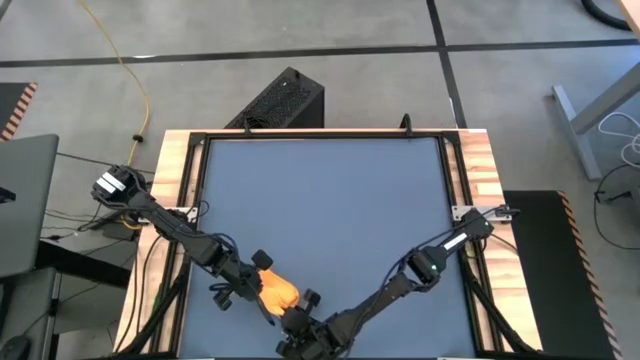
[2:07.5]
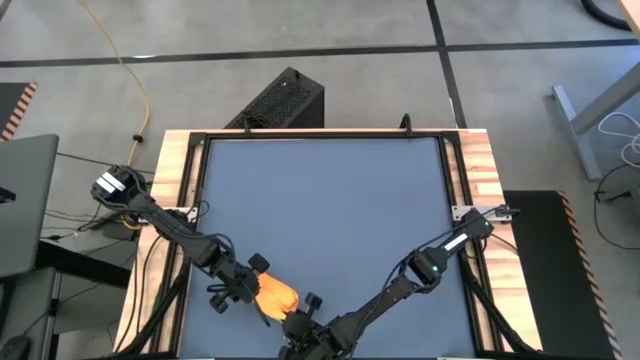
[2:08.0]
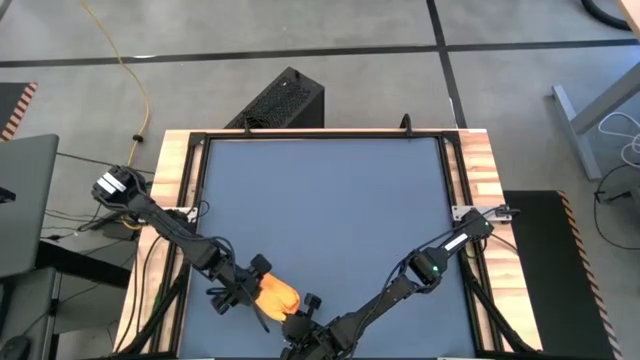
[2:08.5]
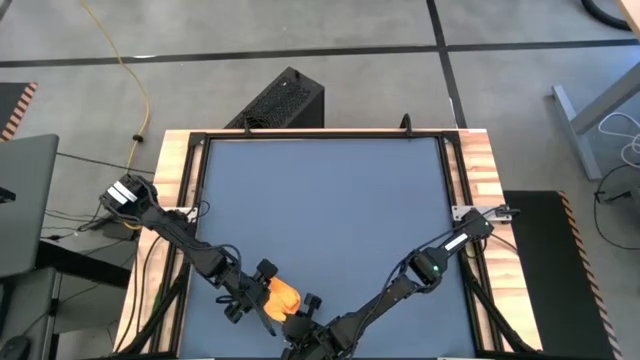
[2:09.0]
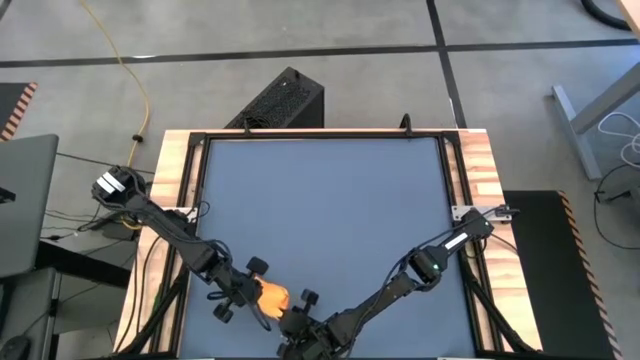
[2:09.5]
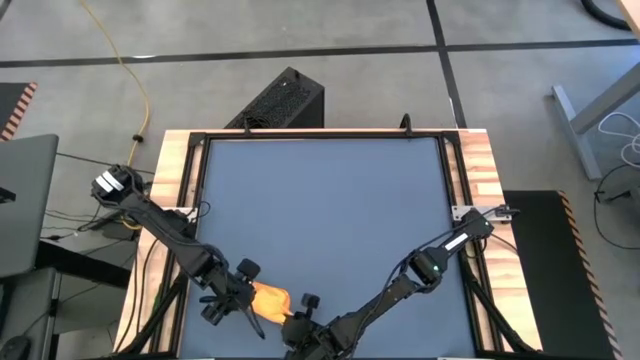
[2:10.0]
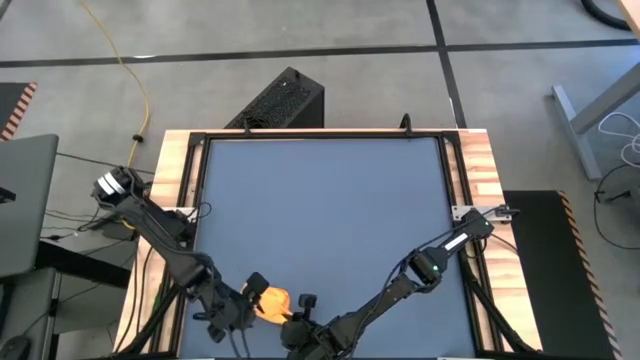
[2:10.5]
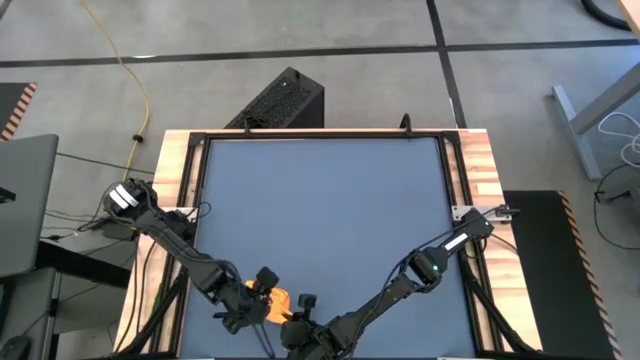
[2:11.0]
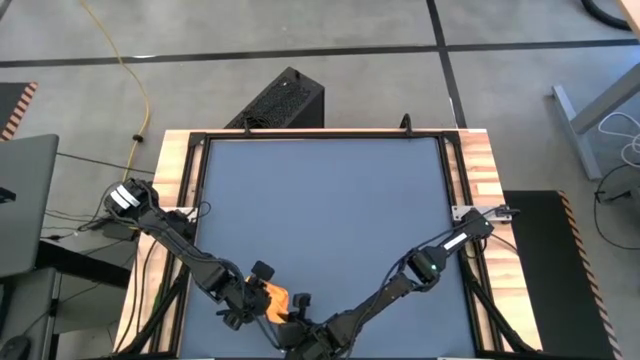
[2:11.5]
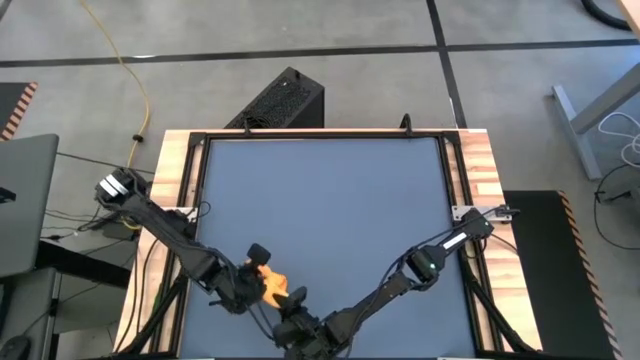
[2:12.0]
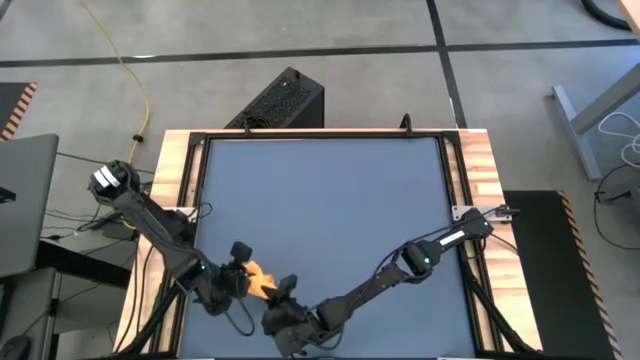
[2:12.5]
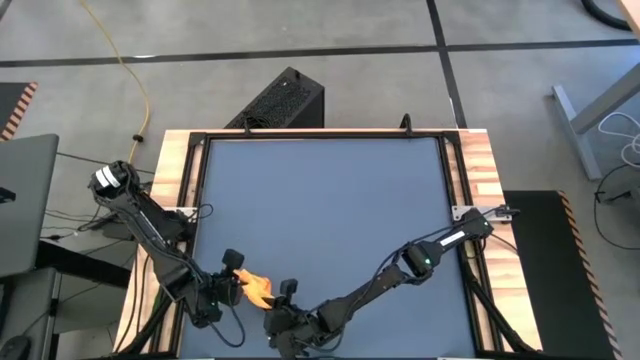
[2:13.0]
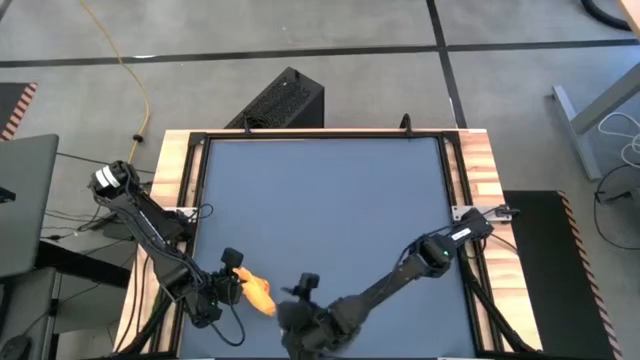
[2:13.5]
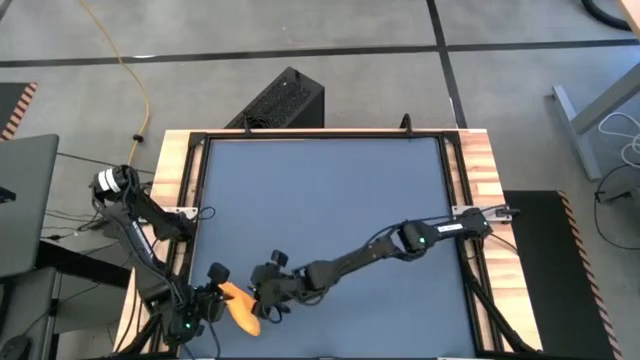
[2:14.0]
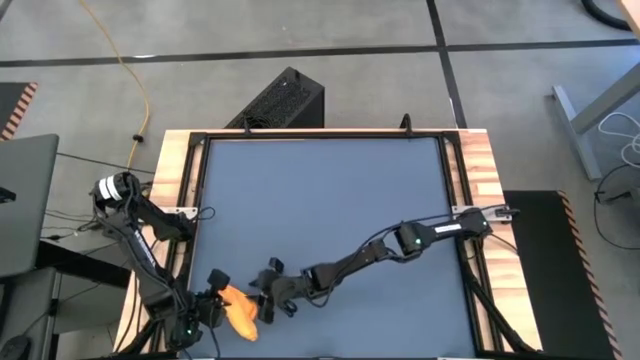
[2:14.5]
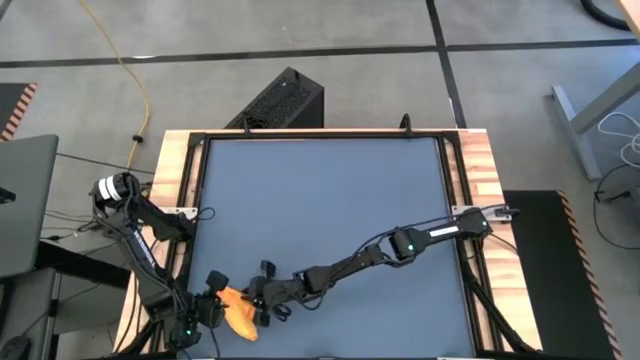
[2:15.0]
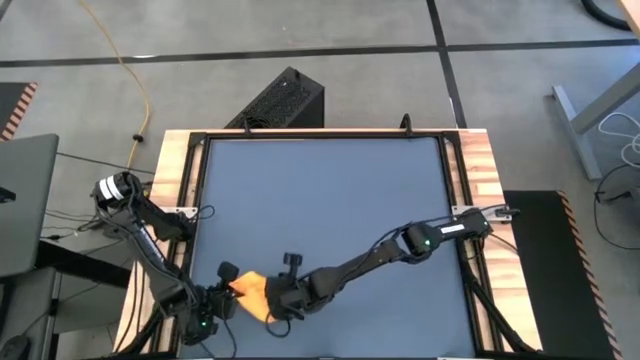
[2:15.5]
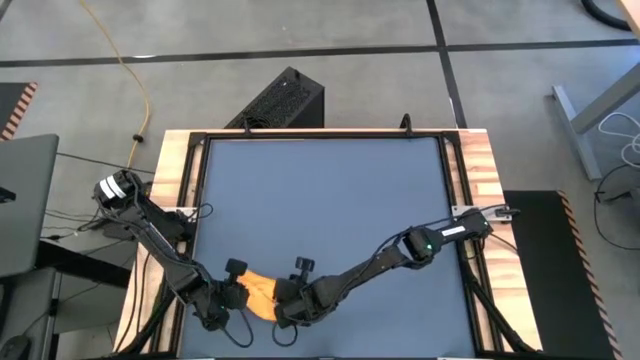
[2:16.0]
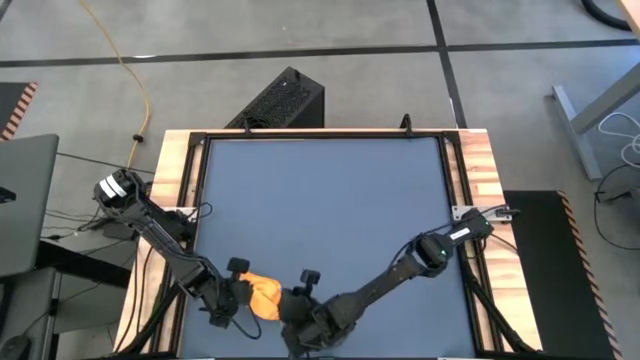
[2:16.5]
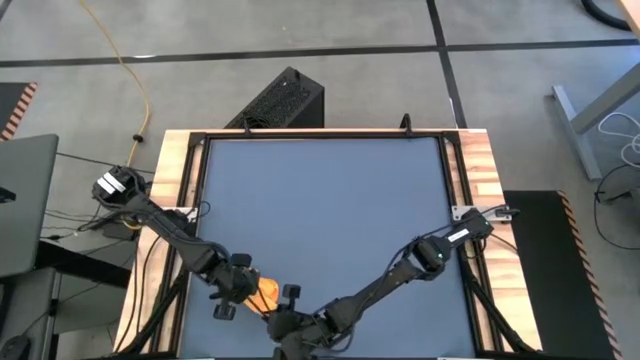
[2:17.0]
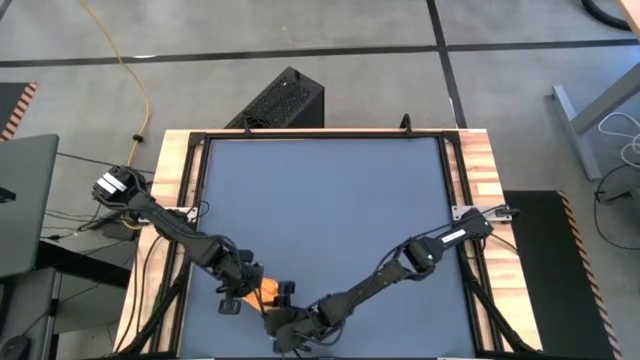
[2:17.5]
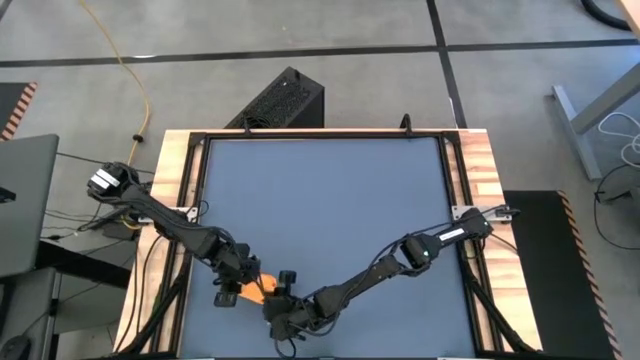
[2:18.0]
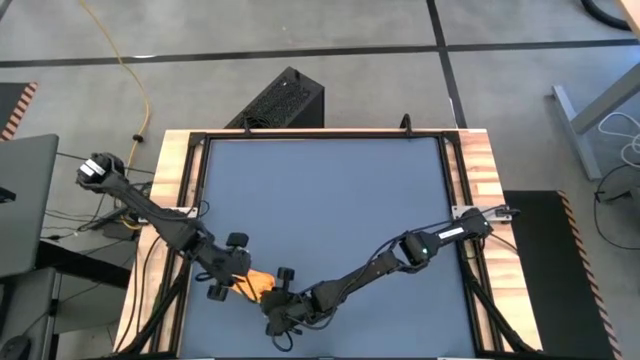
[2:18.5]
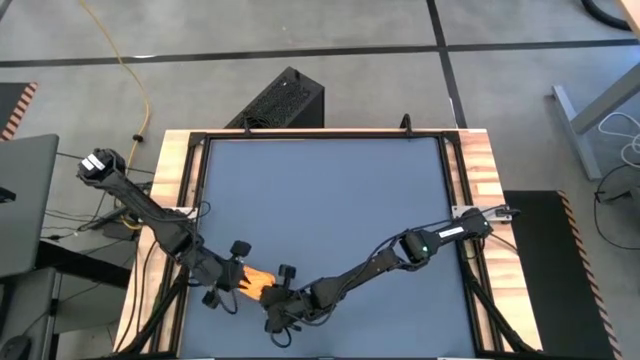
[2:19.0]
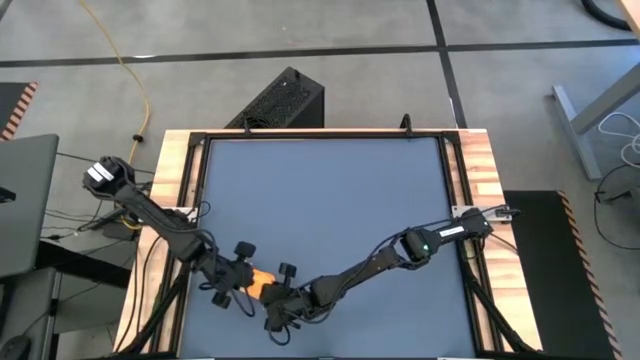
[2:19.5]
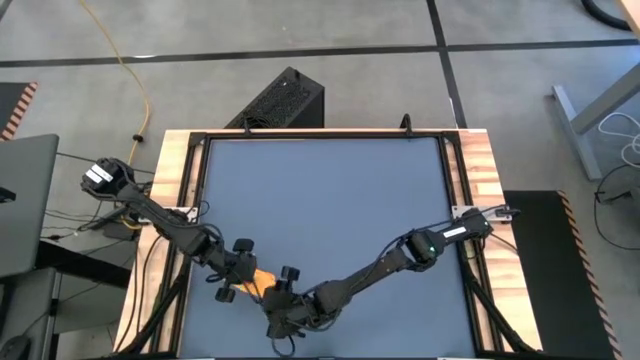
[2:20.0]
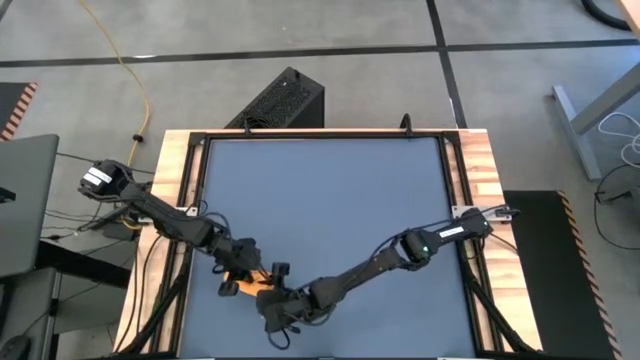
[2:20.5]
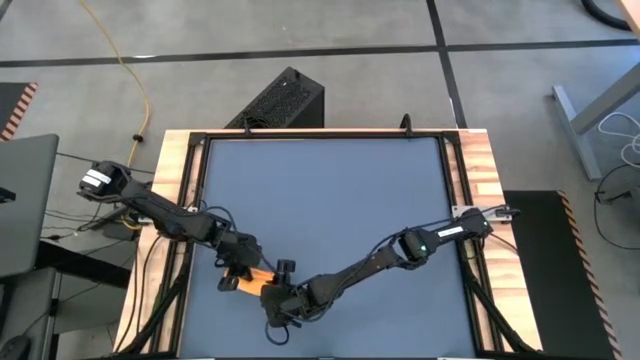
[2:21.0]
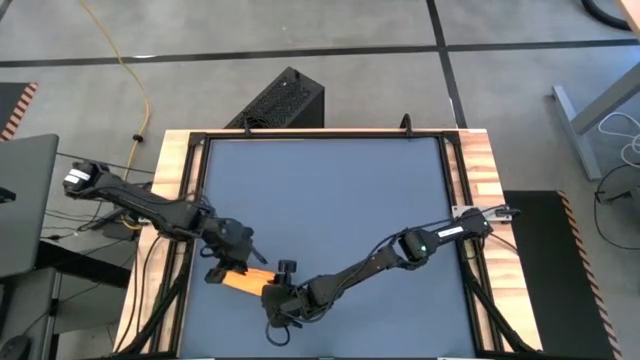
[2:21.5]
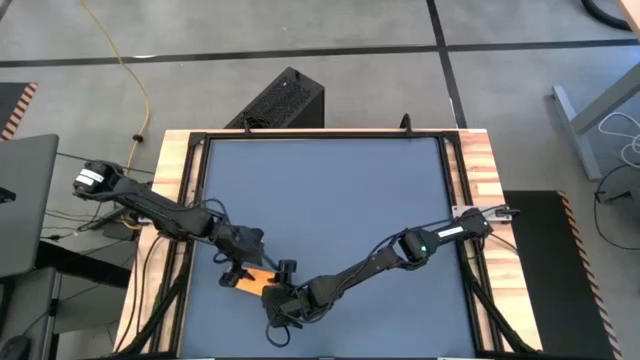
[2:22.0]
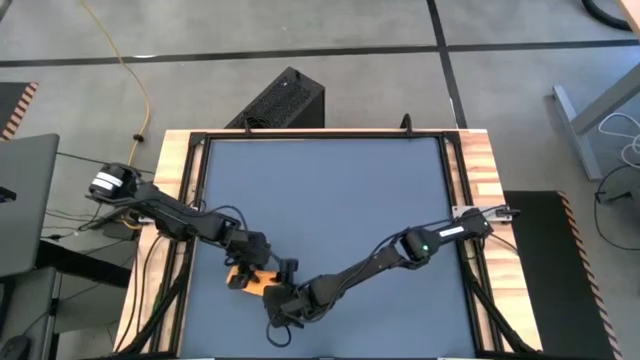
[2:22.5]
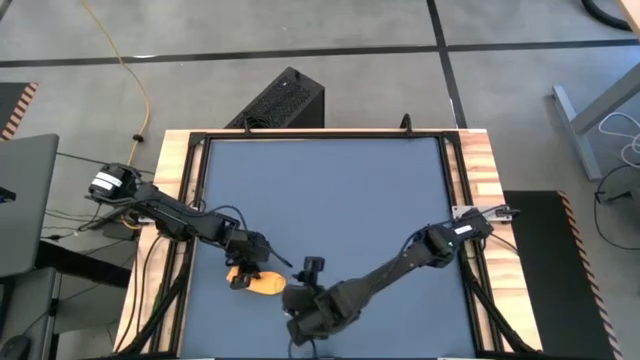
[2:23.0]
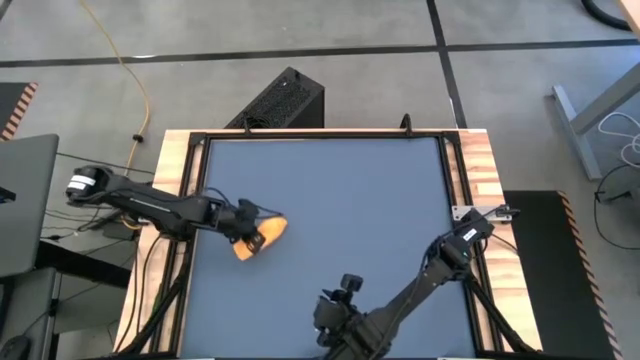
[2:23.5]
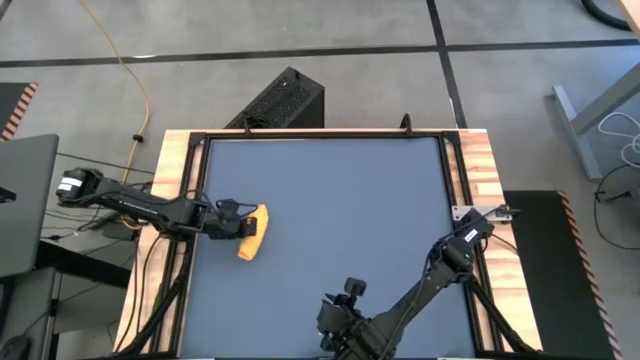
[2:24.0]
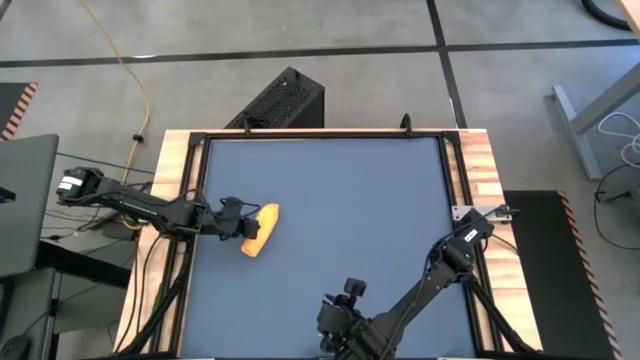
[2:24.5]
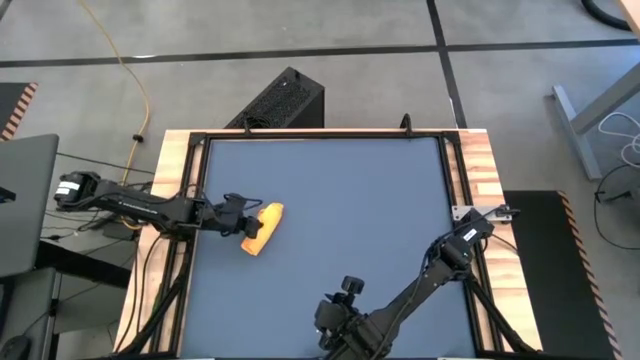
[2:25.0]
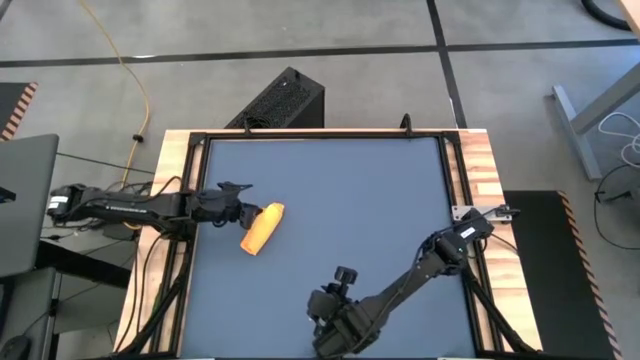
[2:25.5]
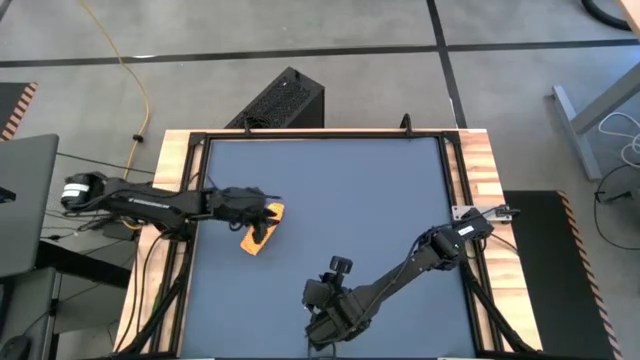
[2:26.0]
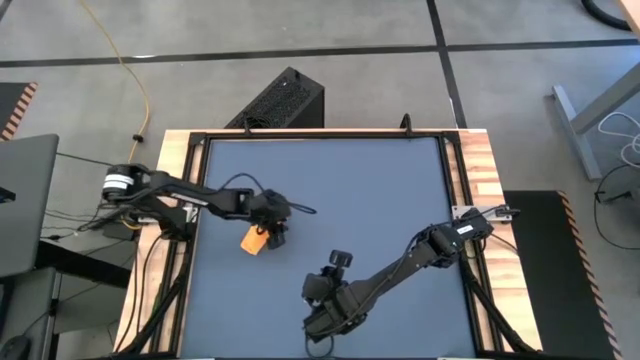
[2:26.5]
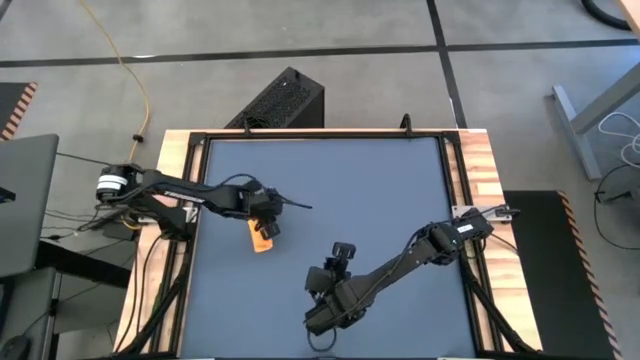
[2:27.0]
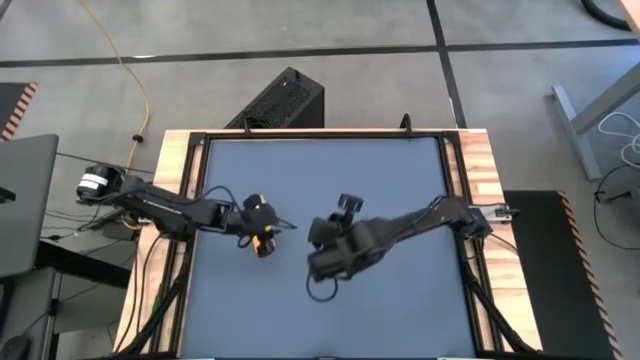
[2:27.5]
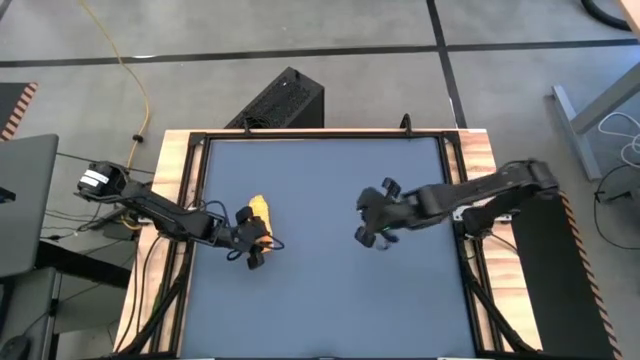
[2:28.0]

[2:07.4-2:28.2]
Task: Roll towel
Roll the orange microfiber towel
